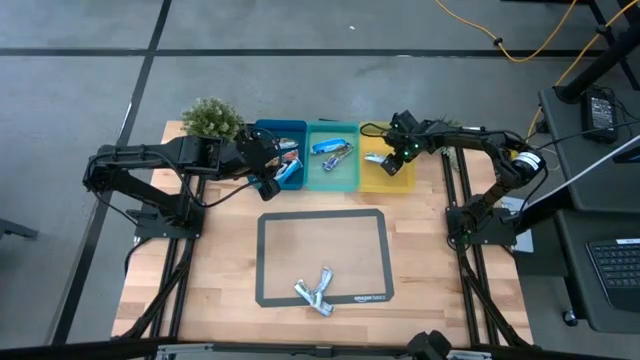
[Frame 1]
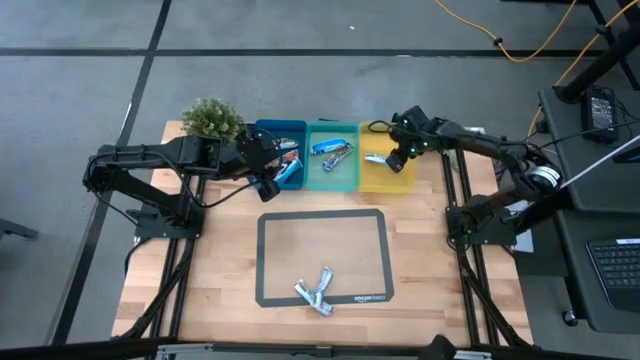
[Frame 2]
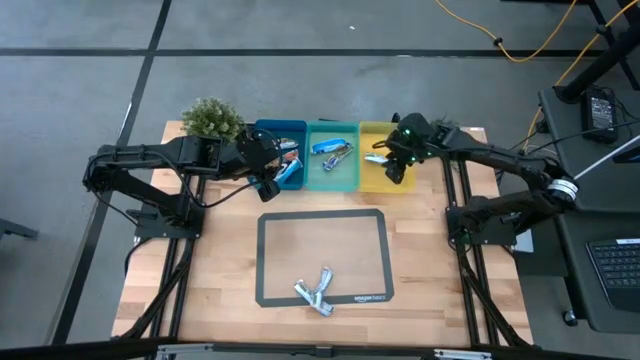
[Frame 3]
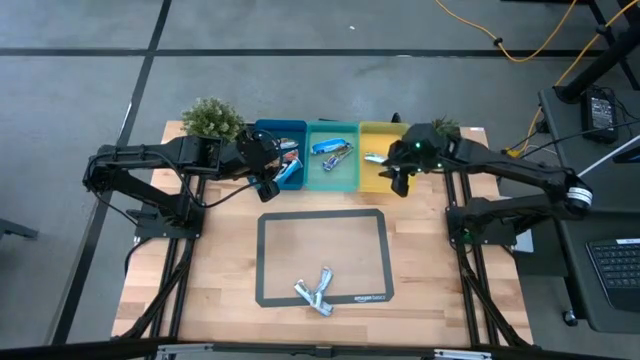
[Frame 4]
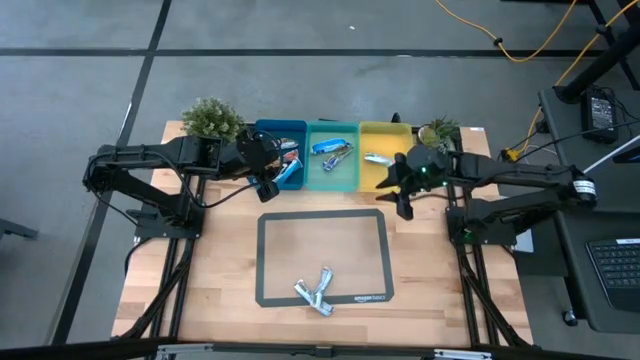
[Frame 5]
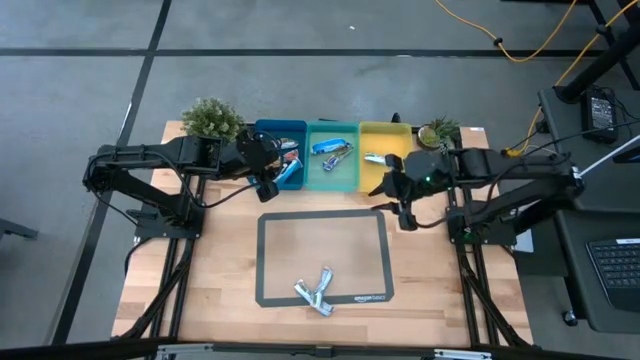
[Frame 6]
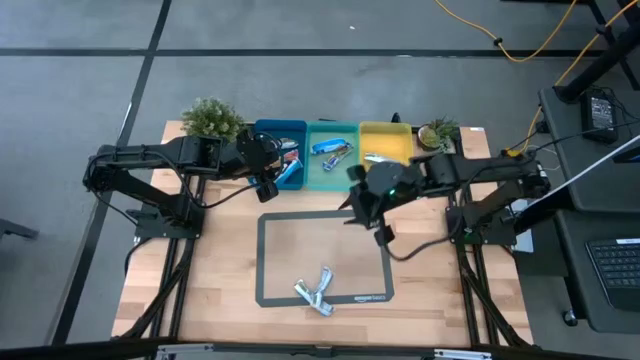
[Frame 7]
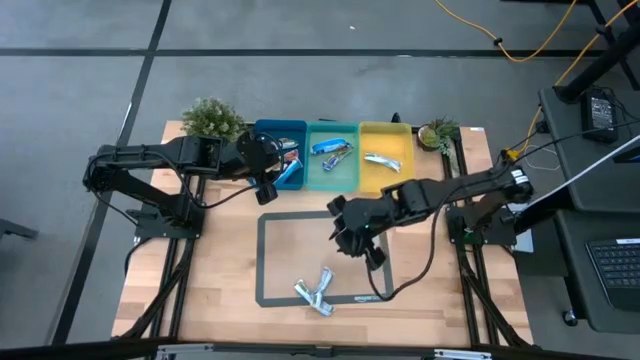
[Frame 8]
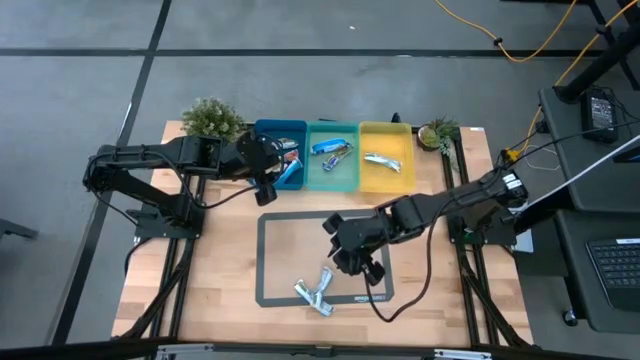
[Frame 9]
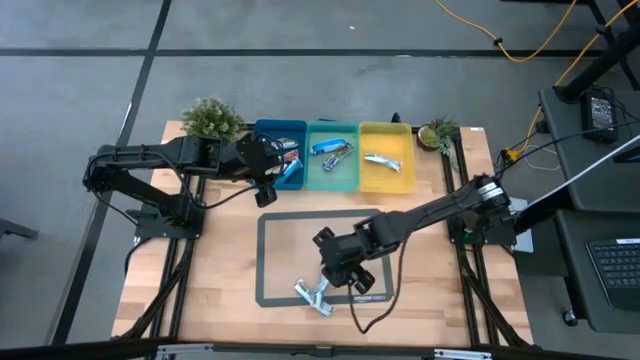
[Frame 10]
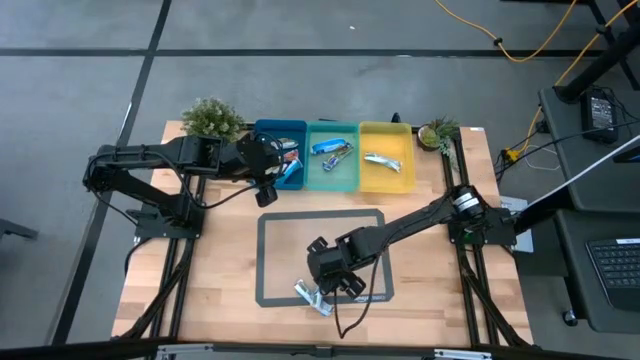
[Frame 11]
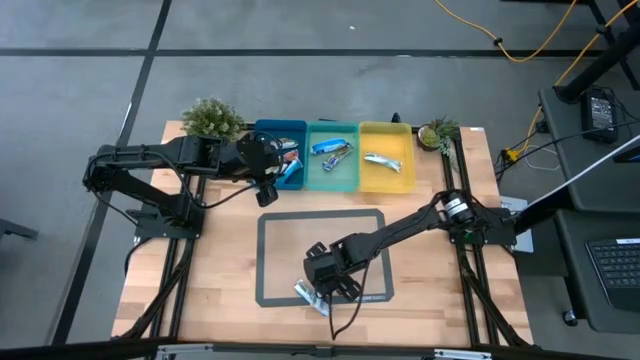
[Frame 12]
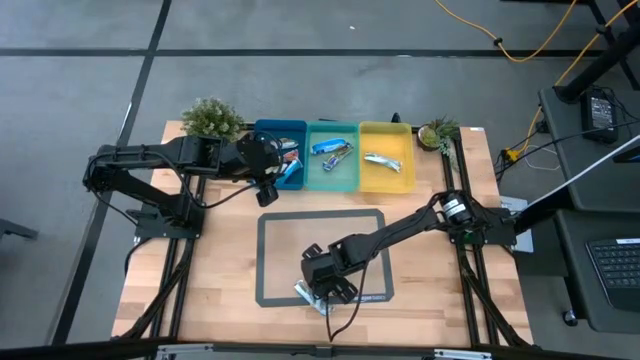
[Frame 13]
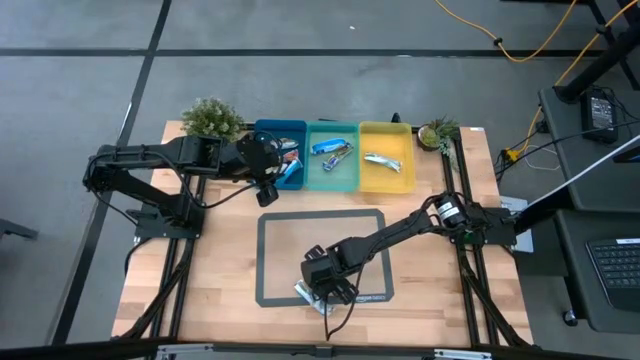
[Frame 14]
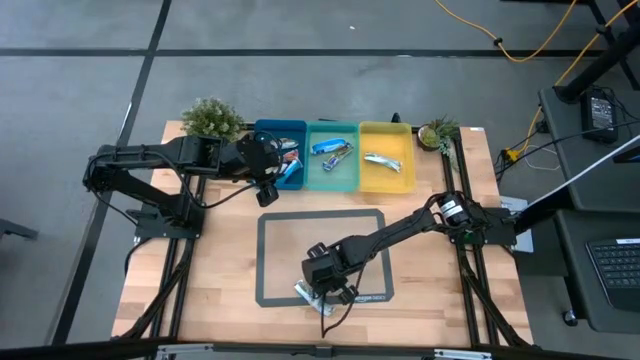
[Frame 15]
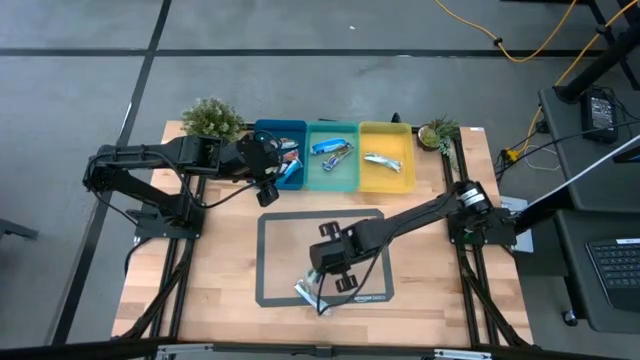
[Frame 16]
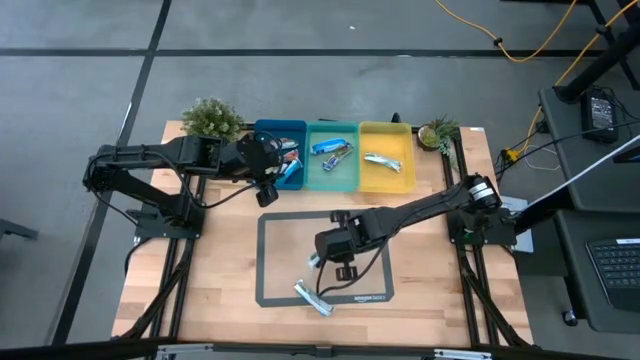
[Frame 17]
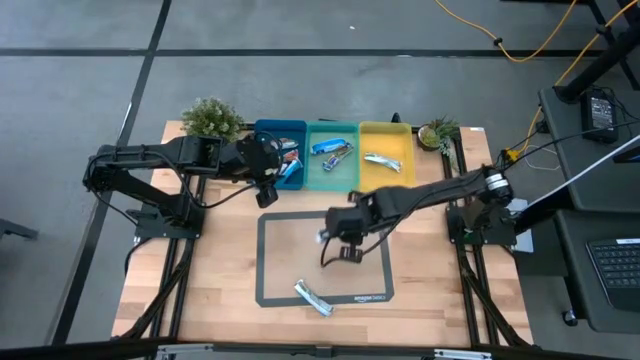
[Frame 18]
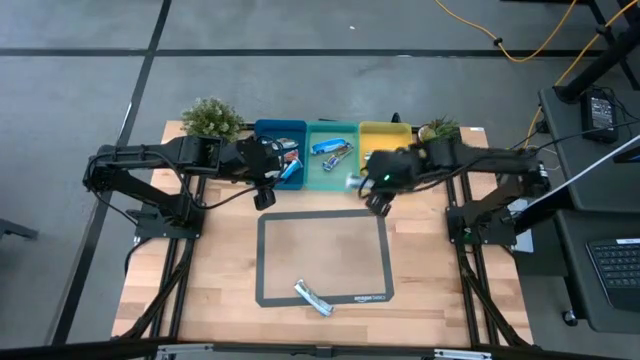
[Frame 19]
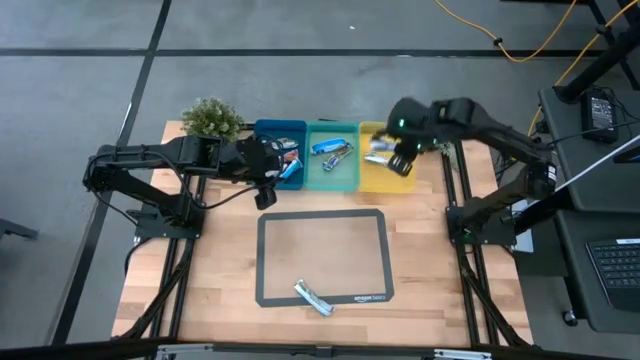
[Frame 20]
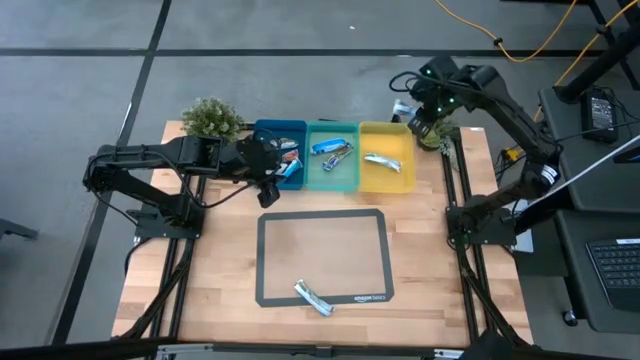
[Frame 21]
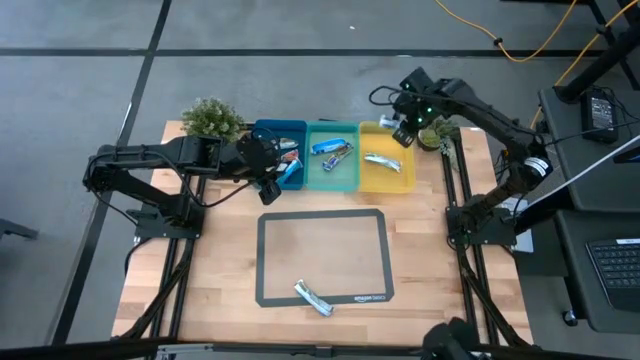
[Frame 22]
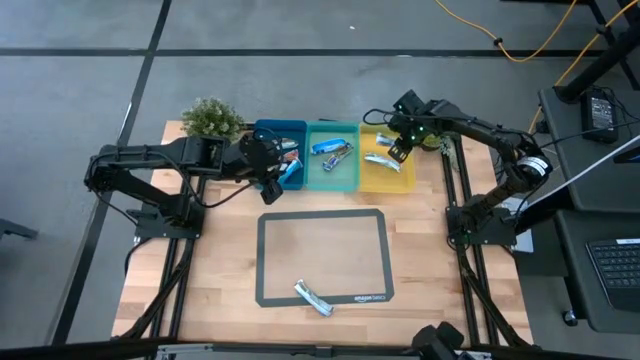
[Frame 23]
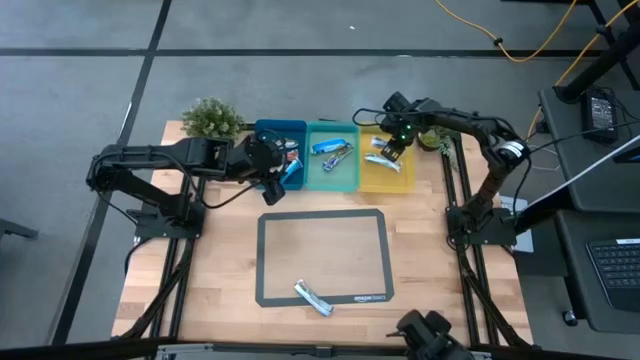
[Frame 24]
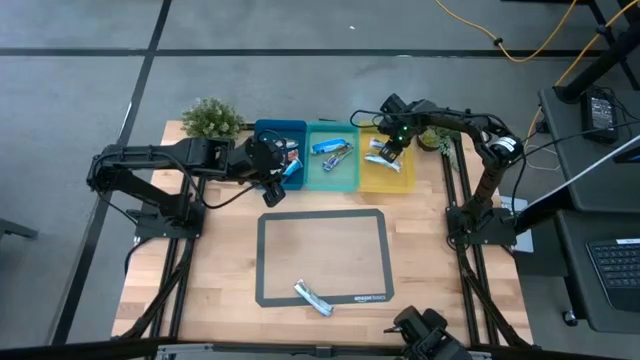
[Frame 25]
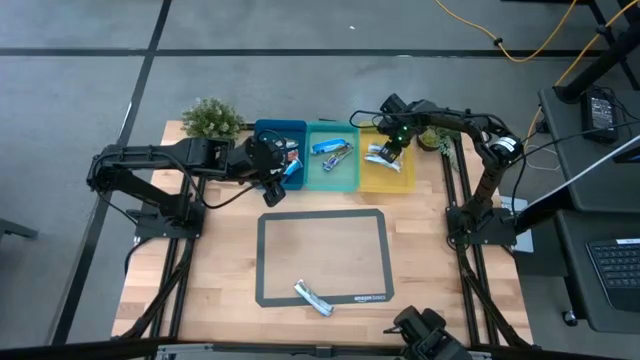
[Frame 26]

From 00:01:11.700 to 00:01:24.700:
Task: Pick and place Granola Bars by type
Put the right yellow granola bar into the yellow bin

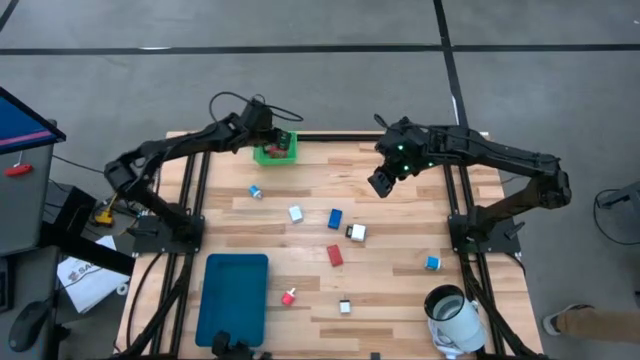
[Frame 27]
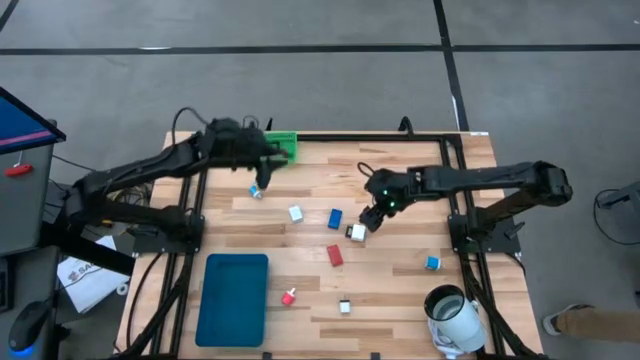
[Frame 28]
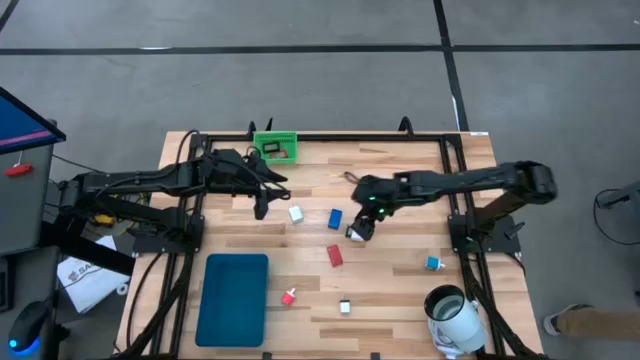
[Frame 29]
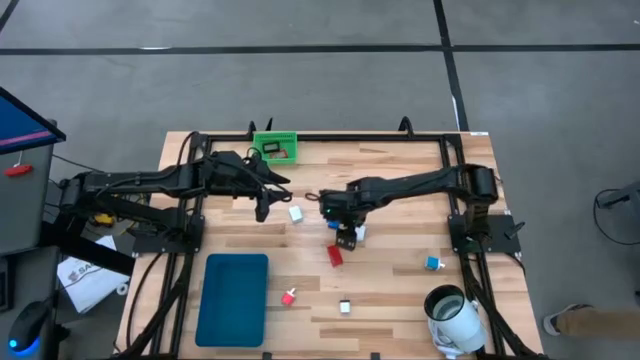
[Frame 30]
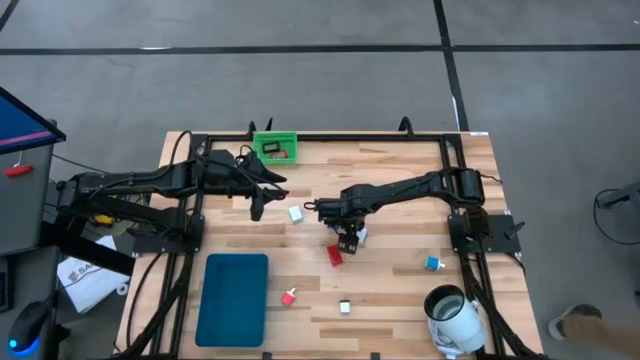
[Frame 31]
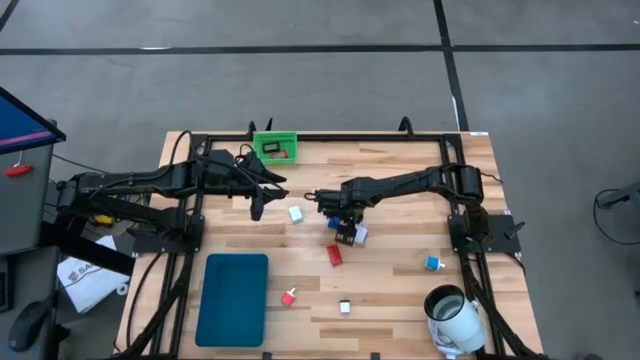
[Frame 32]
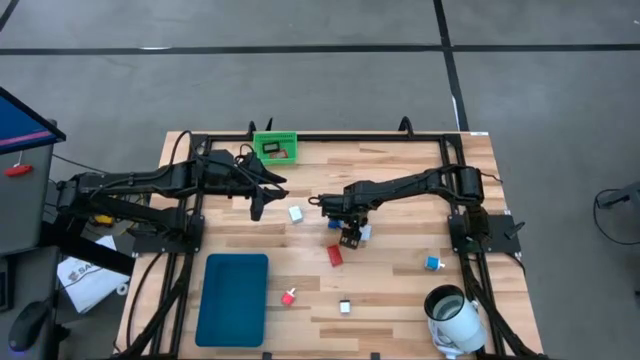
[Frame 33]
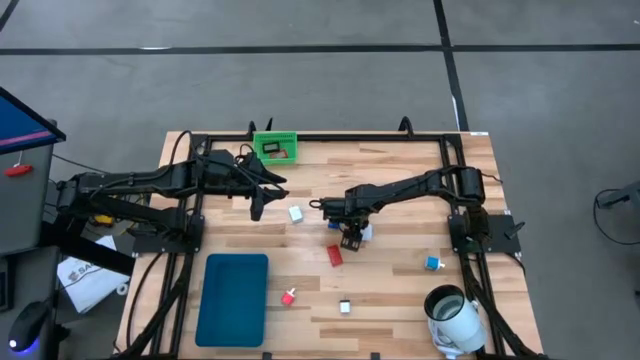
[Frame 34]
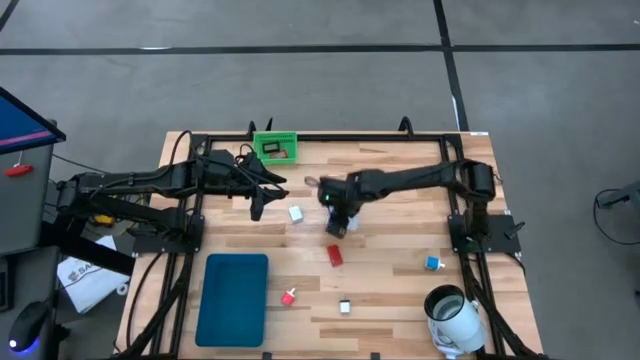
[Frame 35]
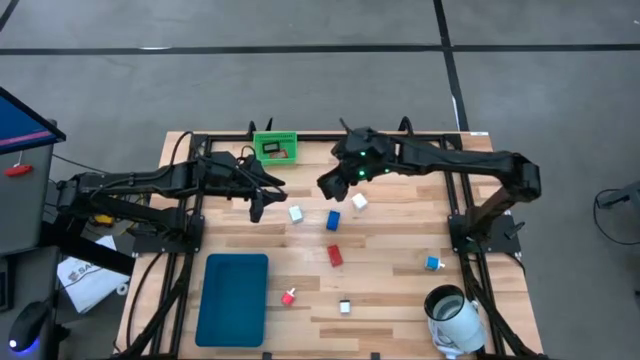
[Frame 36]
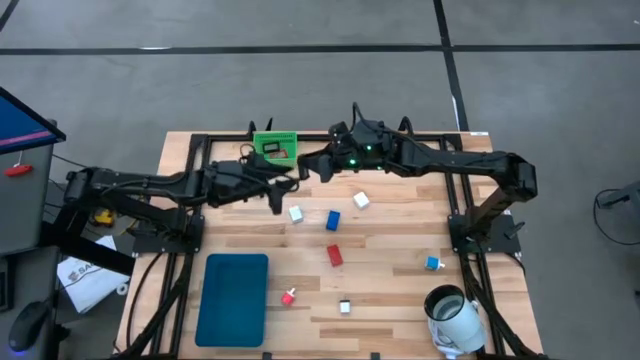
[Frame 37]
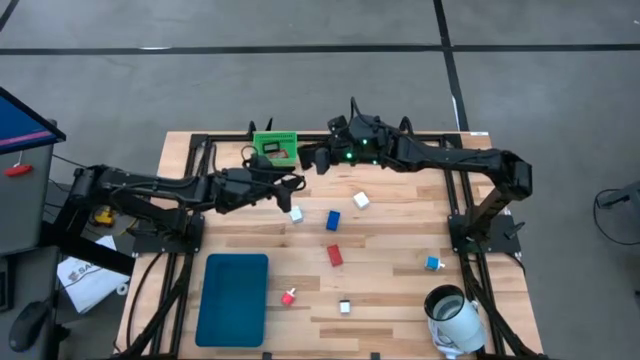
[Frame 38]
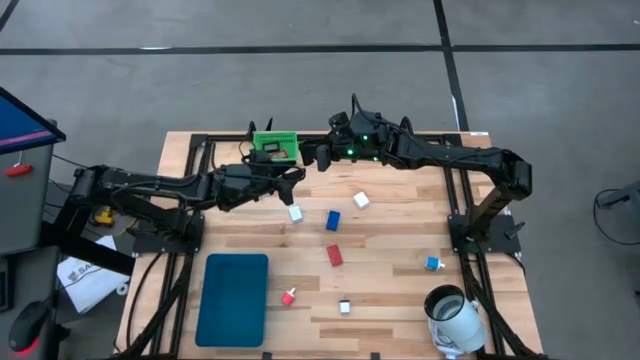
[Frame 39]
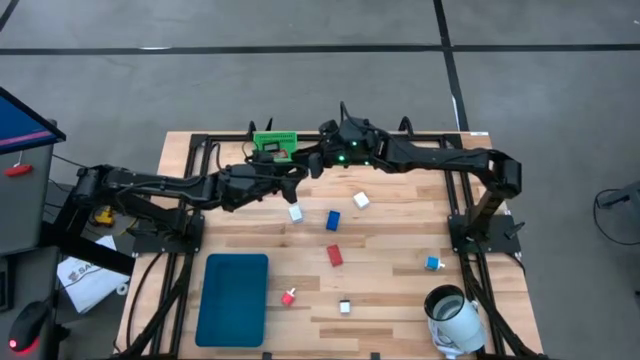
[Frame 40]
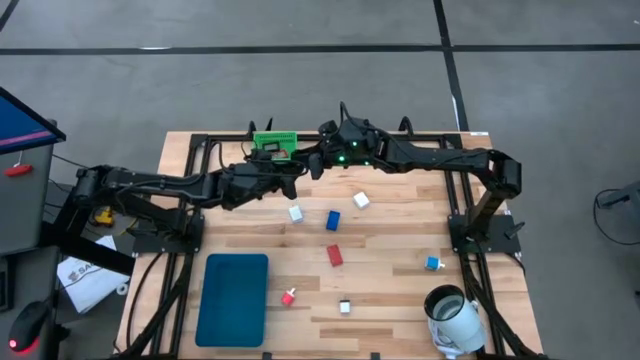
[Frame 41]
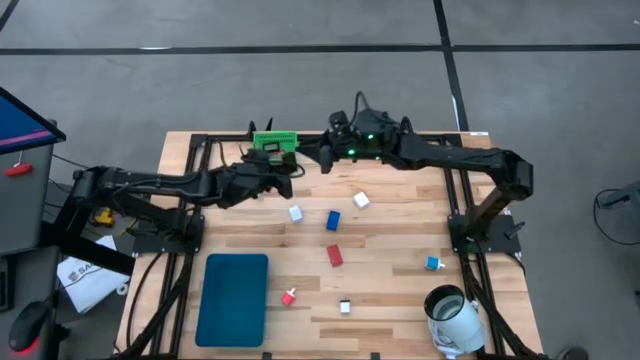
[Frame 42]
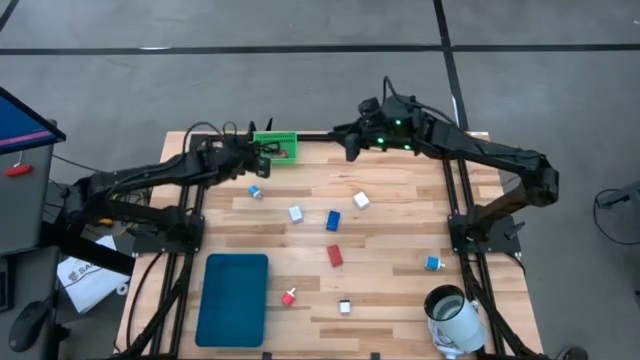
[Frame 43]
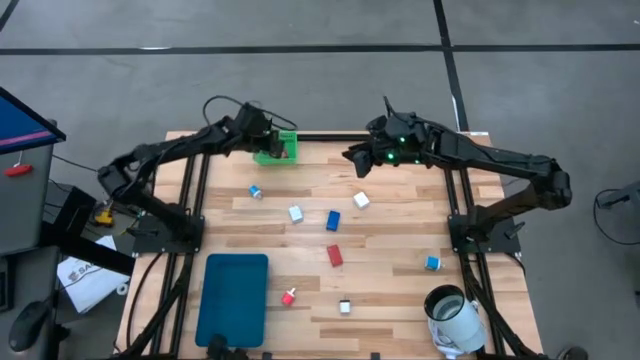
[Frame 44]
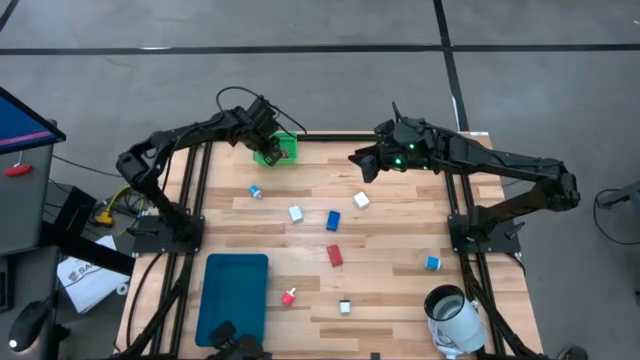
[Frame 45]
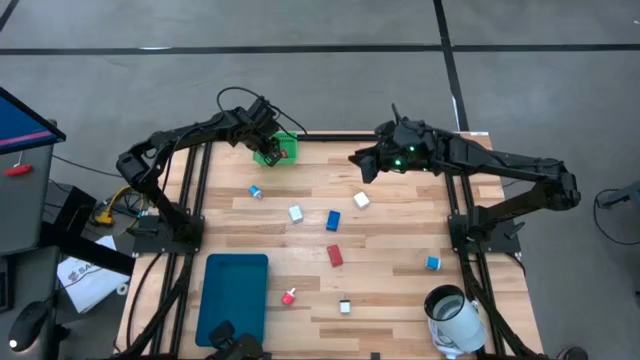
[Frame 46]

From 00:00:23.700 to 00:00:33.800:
Task: Pick & Place Office items
Put the black digital clock into the green bin
